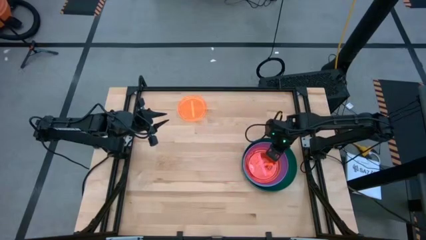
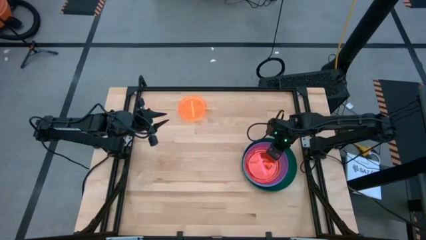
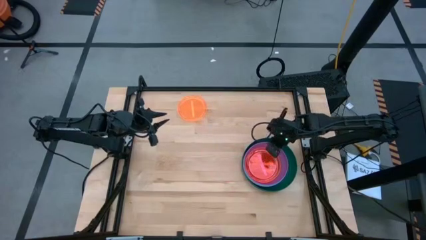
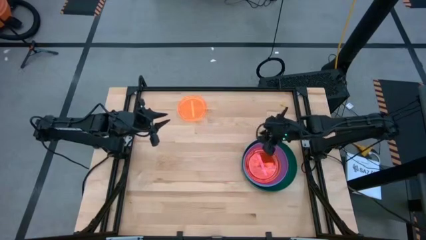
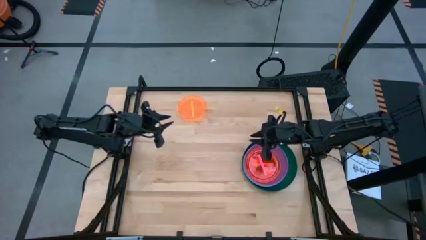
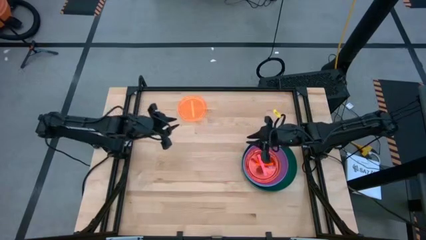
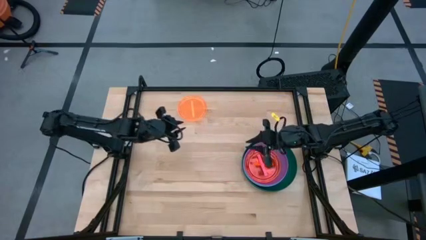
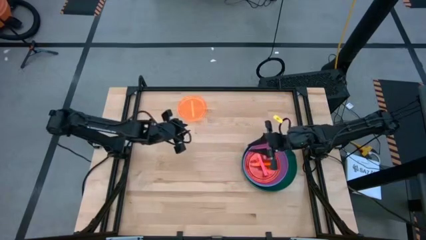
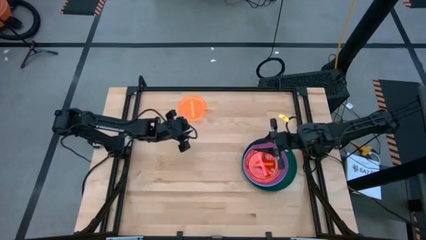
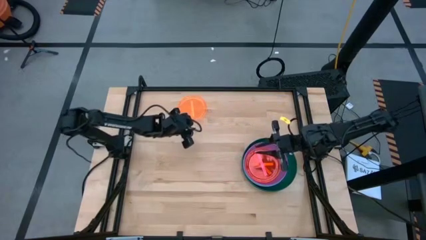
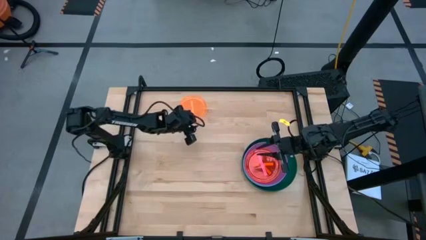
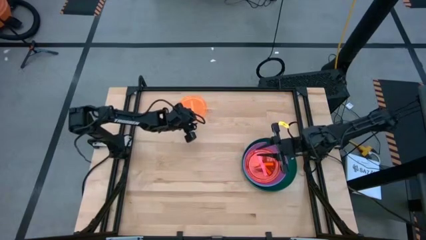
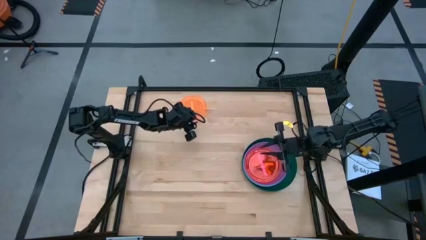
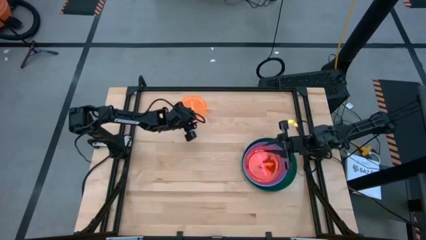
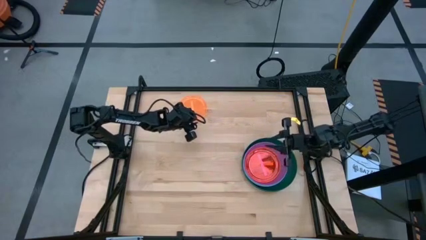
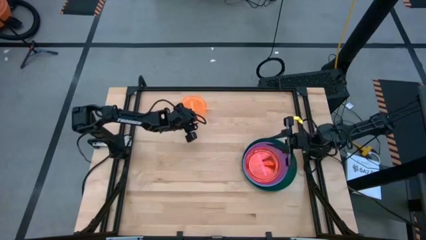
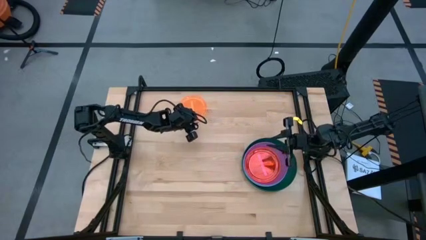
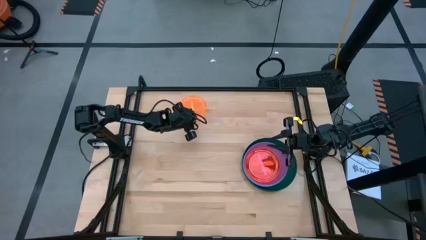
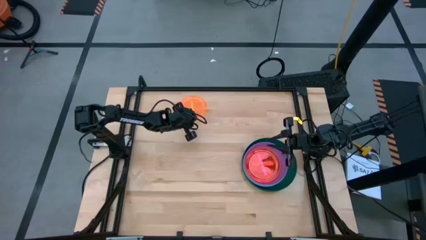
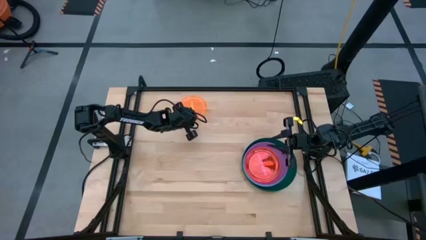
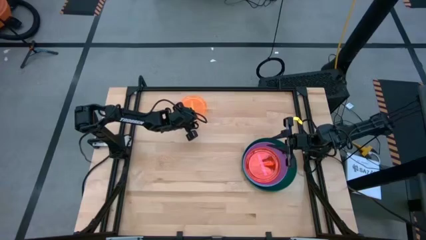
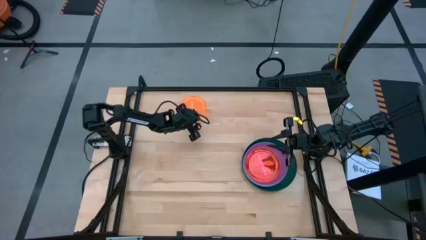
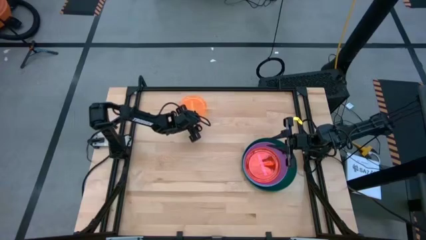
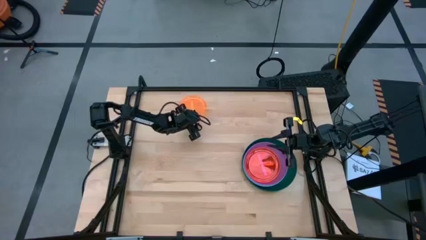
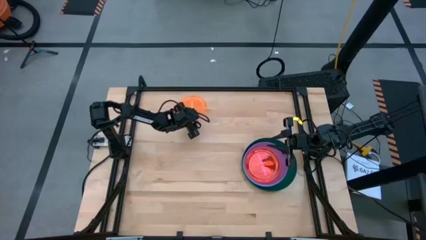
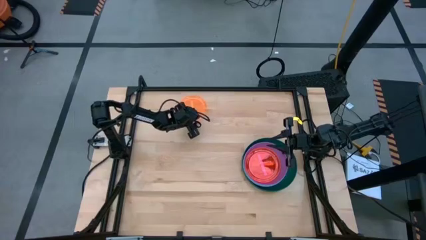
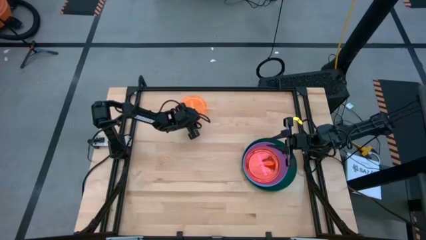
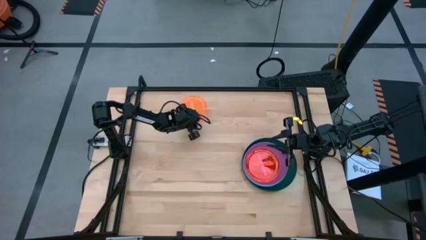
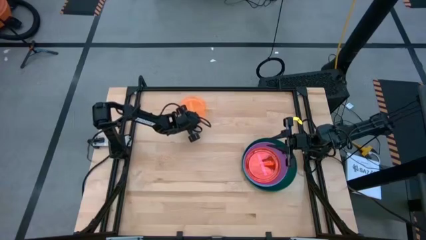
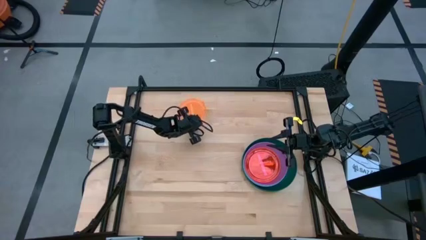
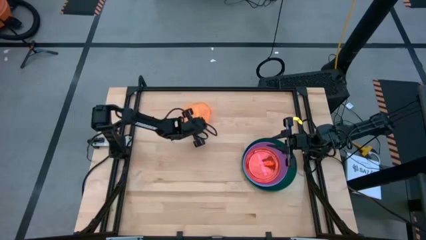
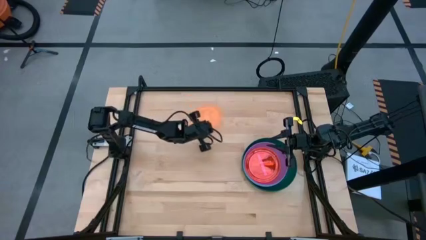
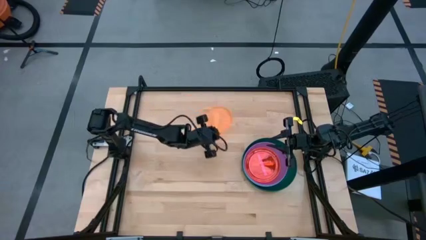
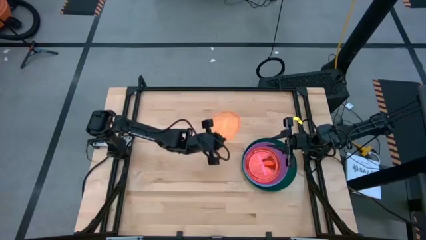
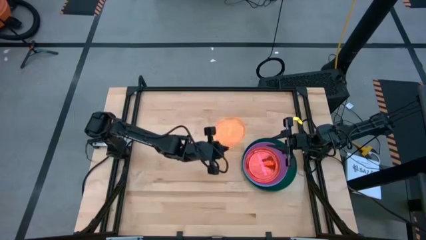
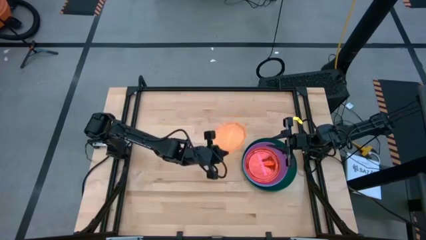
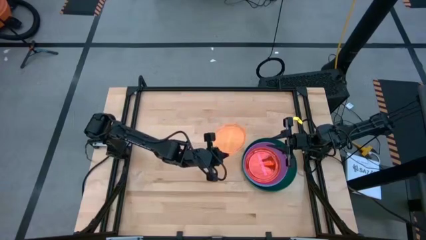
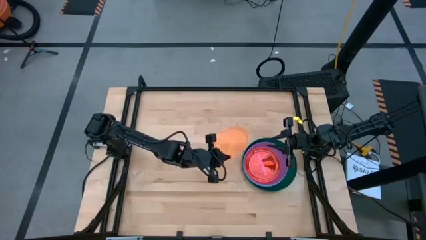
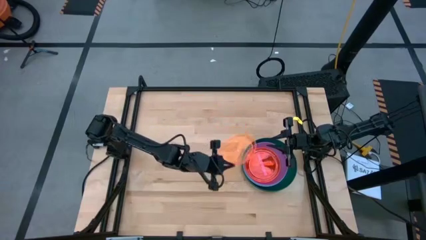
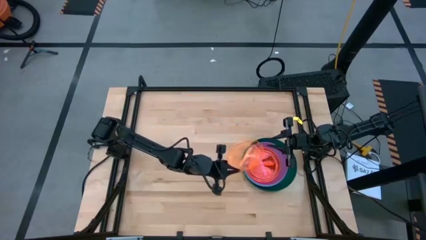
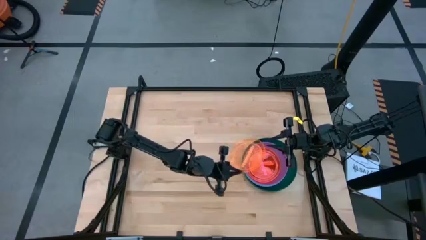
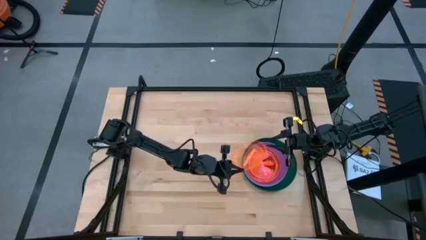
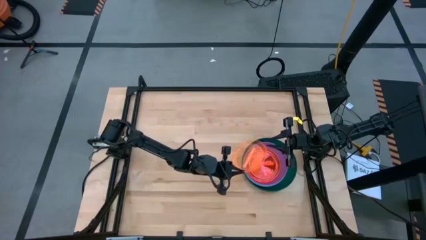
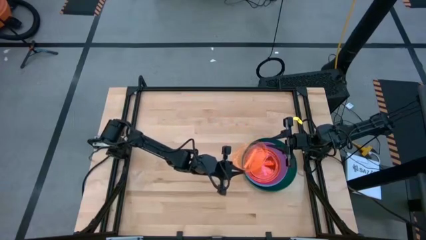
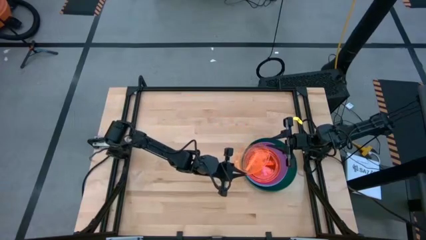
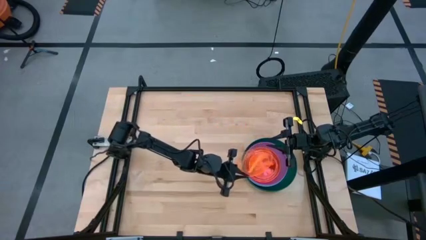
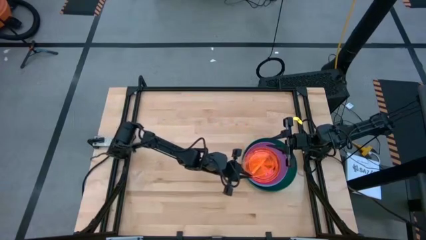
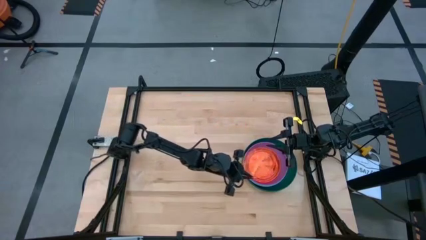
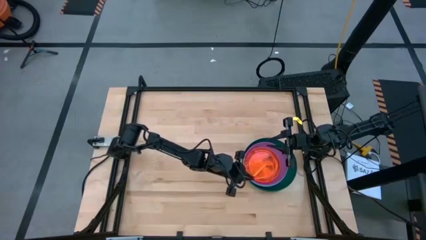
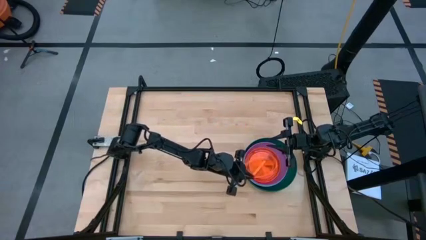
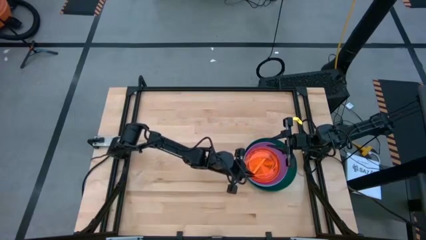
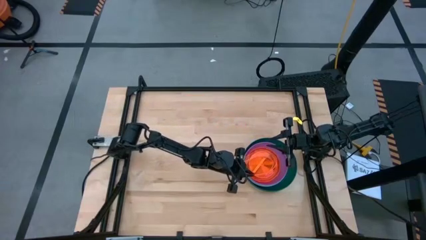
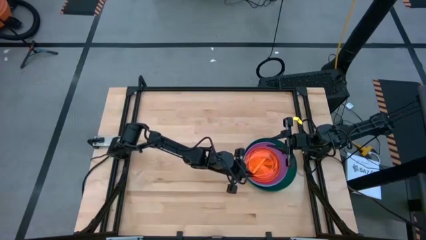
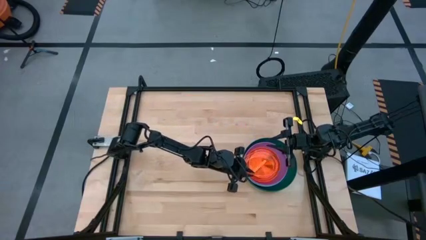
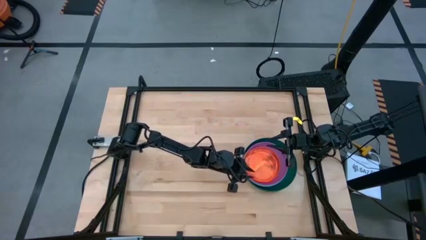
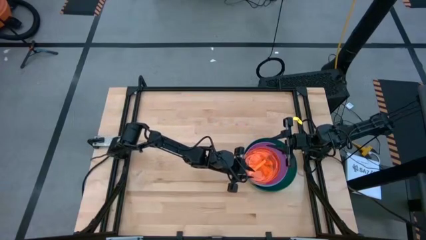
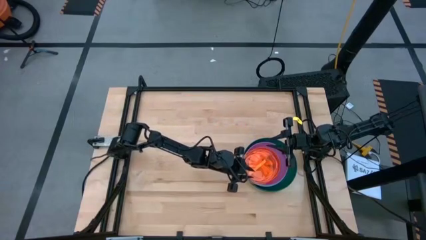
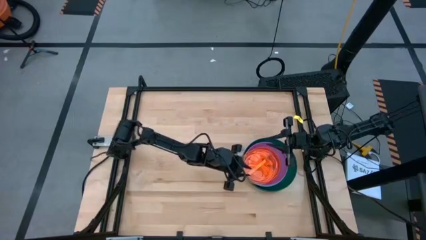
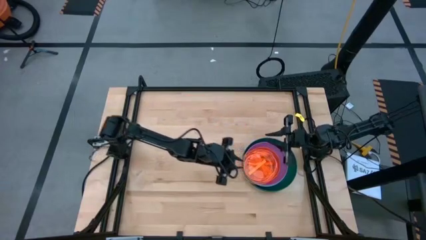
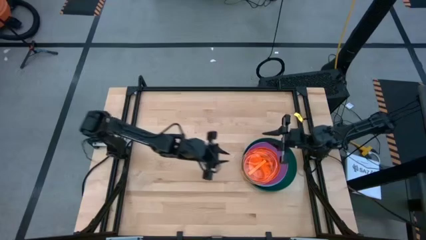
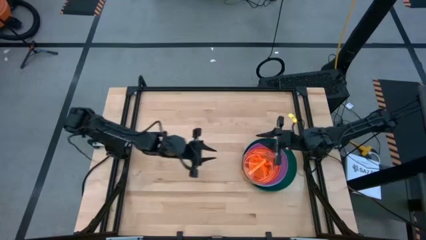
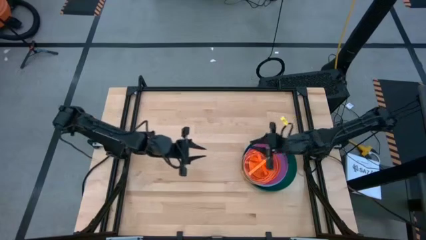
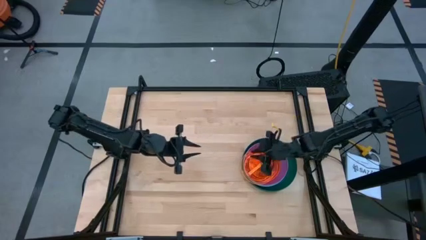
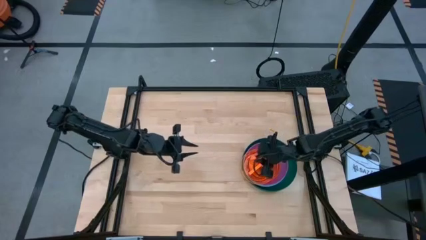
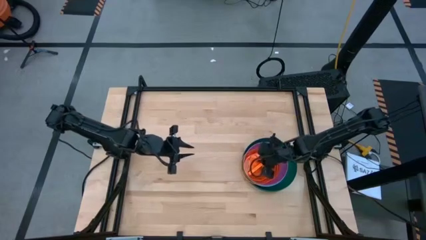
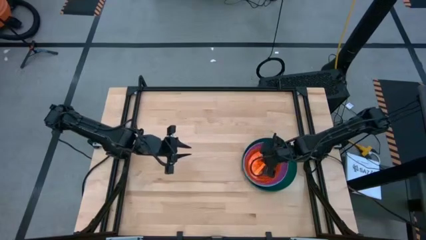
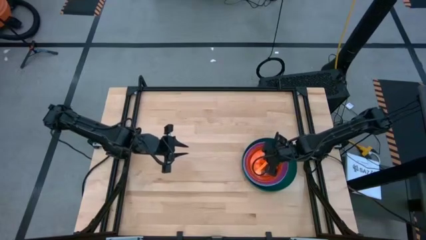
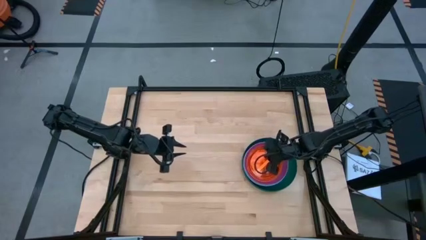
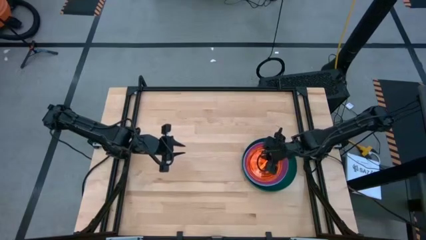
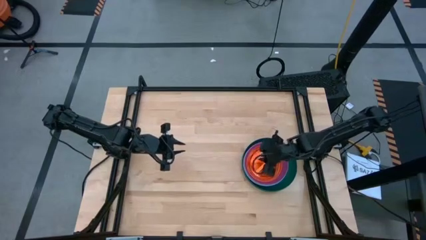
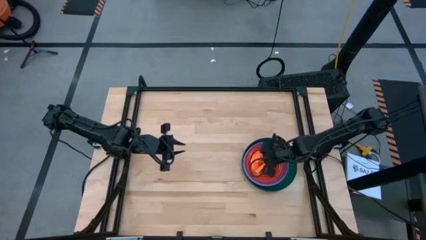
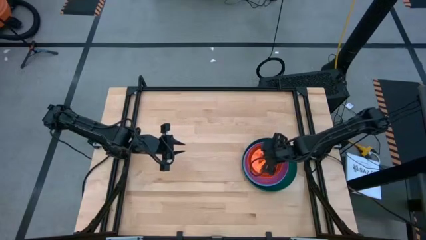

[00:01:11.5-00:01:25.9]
Task: Stack plastic plates
Stack the small orange plate on top of the small pink plate
